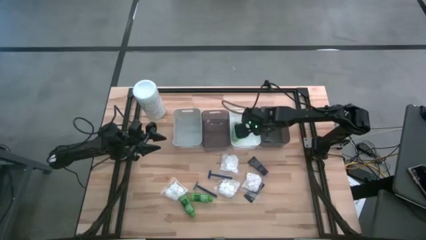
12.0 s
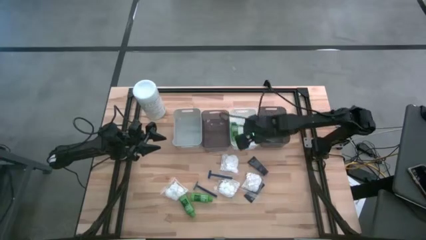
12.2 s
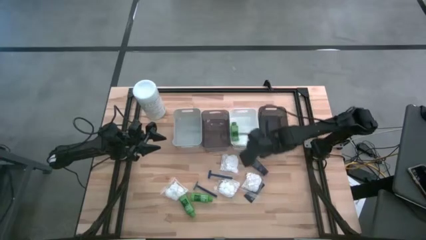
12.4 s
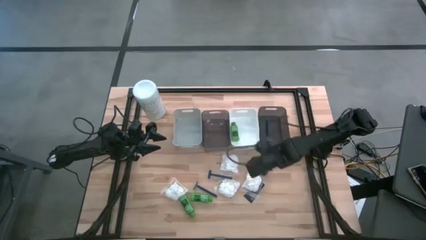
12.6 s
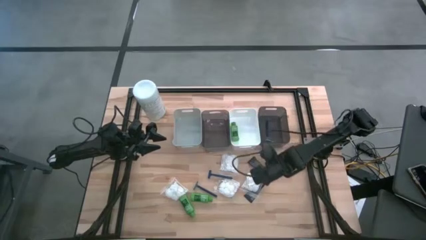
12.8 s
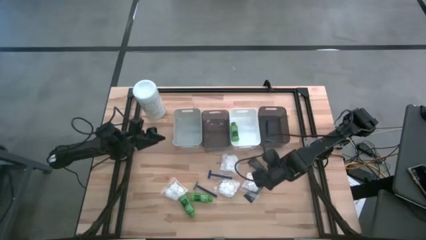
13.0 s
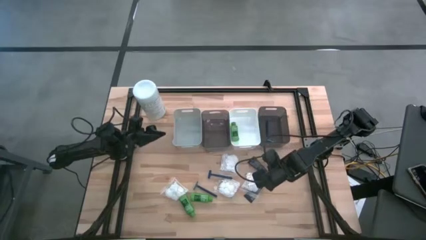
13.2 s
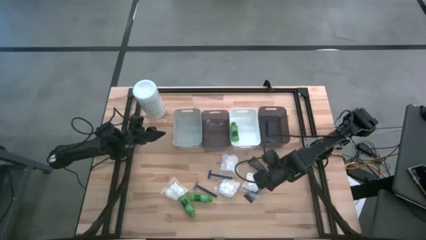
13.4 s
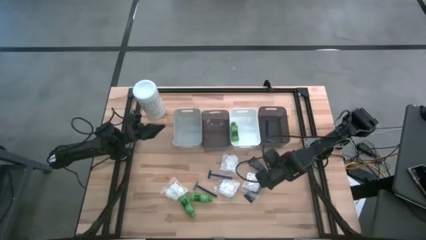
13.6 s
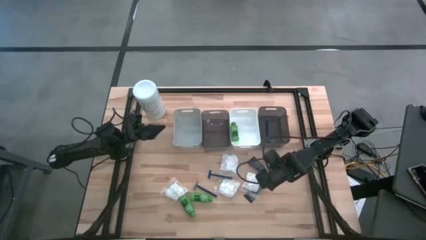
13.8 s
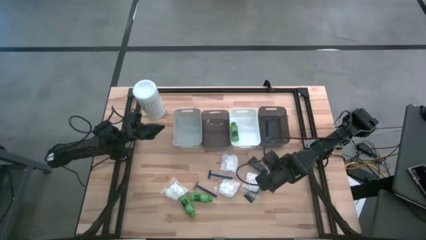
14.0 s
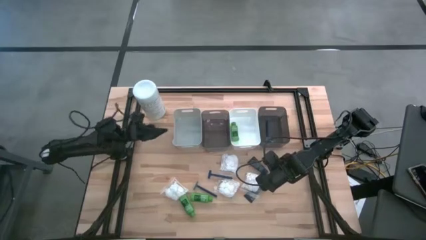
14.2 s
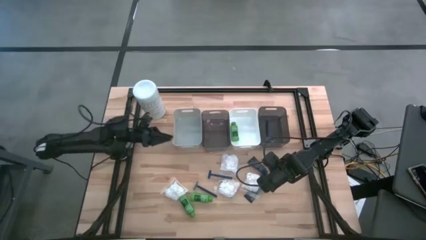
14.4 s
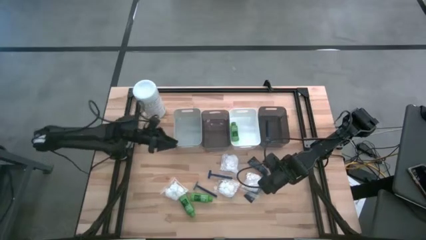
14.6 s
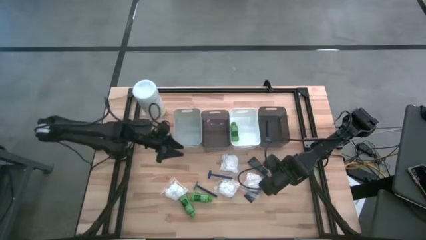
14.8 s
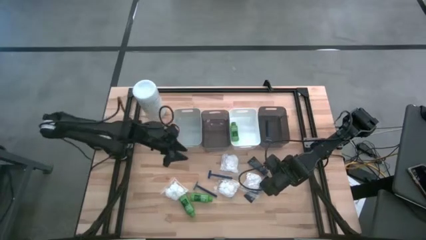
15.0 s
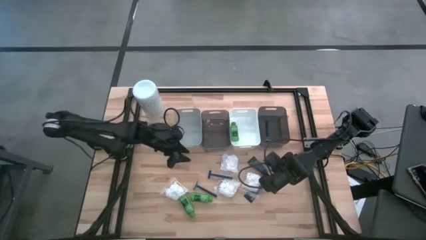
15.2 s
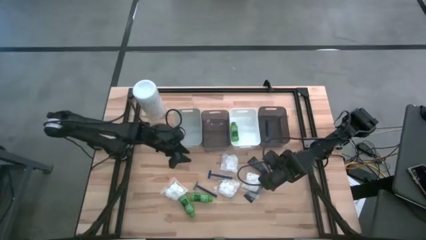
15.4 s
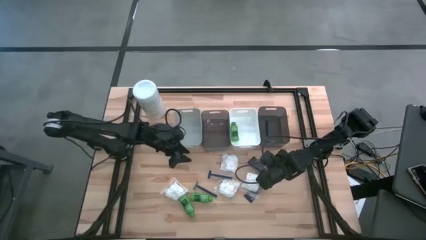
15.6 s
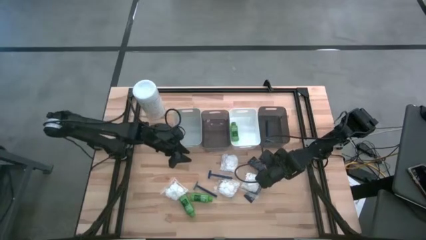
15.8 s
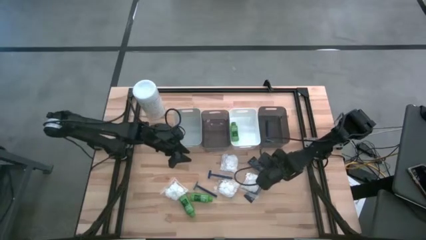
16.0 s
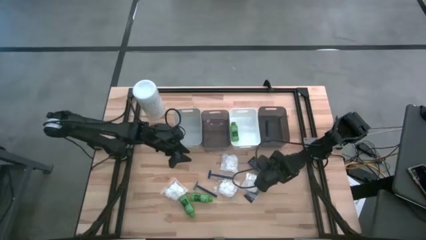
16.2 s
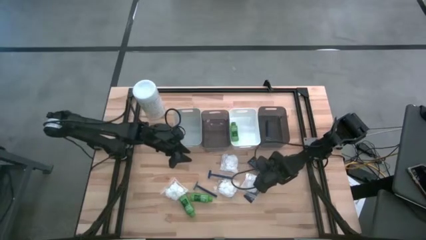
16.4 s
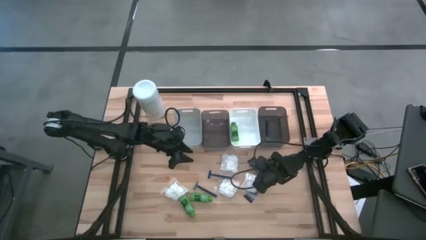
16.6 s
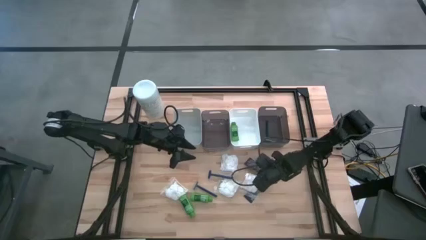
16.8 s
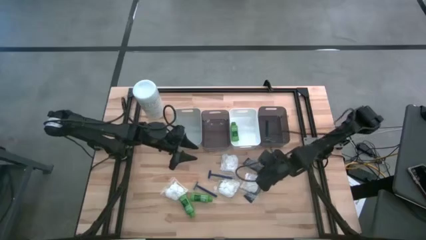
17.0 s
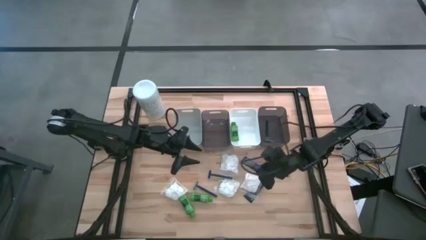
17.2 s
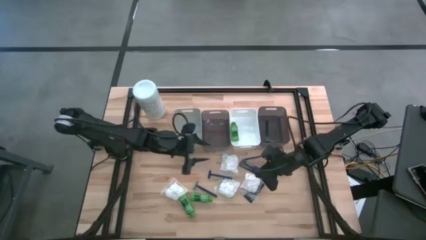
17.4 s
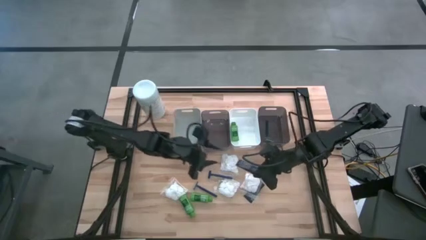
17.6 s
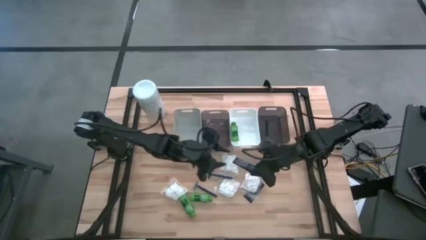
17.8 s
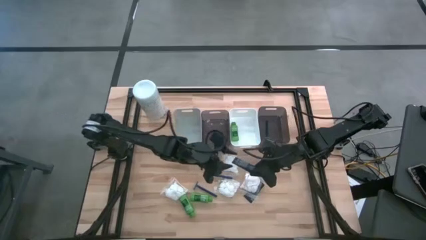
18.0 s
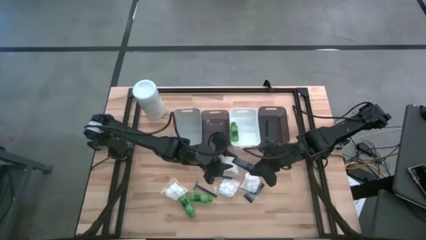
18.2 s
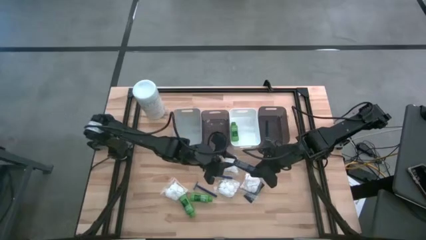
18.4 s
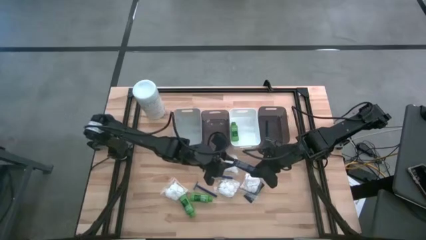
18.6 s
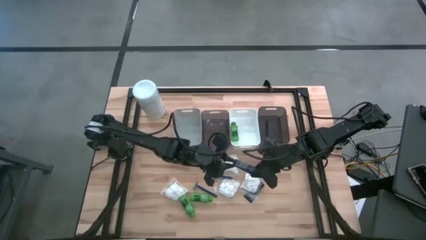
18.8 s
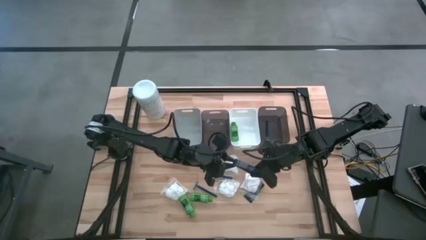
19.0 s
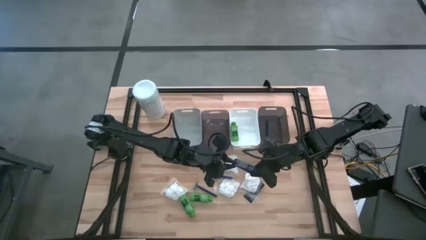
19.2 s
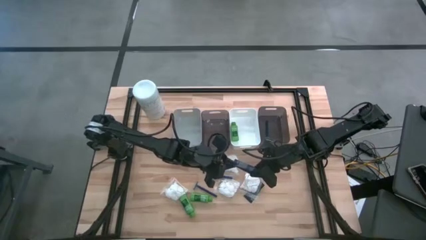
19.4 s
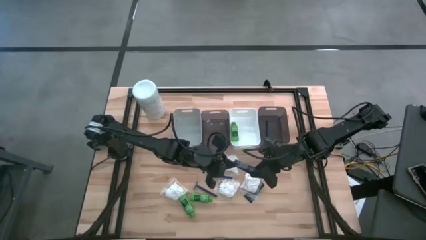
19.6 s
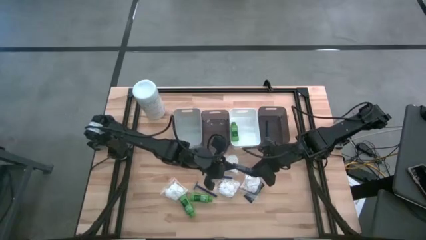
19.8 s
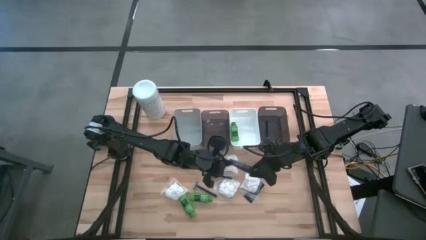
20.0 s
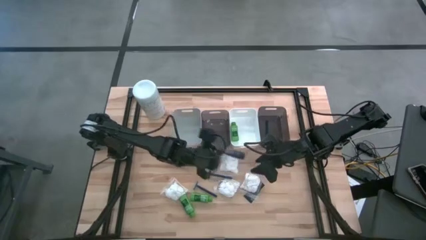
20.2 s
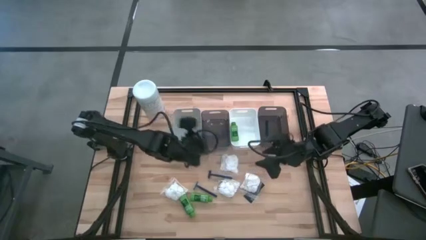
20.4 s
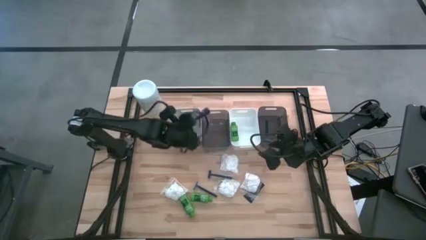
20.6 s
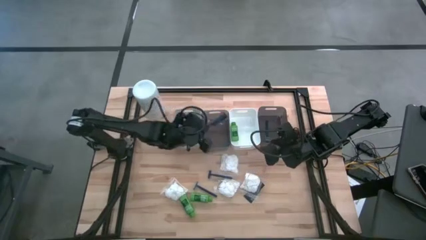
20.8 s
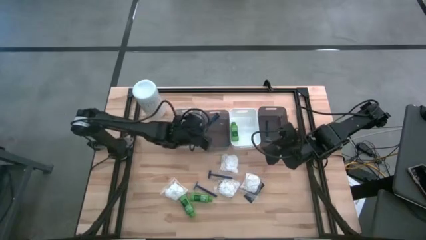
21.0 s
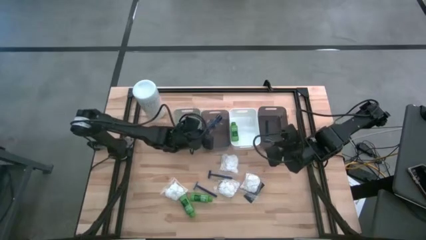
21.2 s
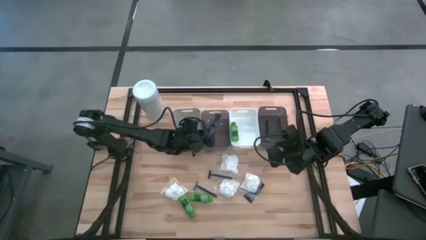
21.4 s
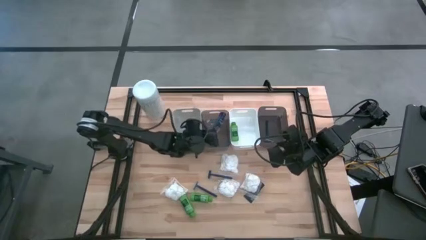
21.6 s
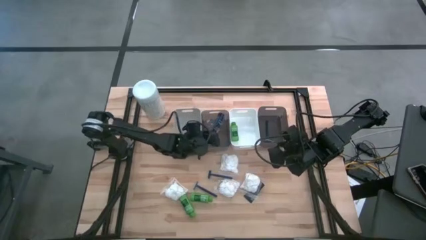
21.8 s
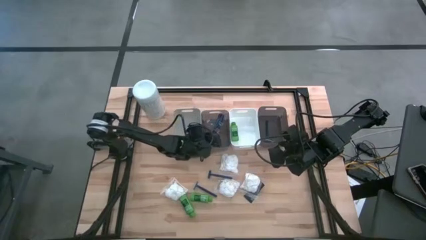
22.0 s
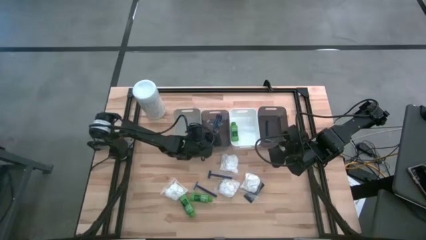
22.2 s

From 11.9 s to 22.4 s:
Task: Pick & Place Travel size toiletries
Put the top blue shave cream into the left black bin

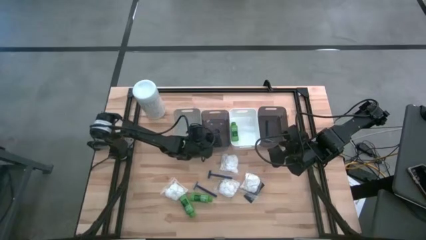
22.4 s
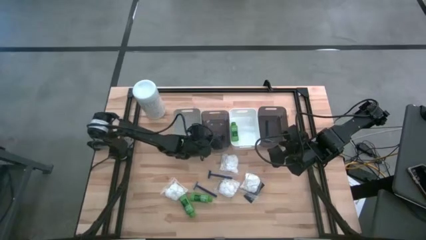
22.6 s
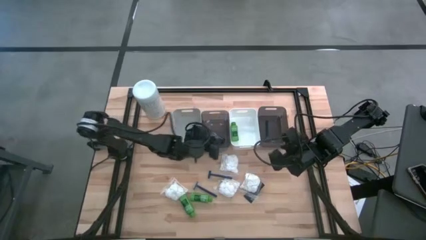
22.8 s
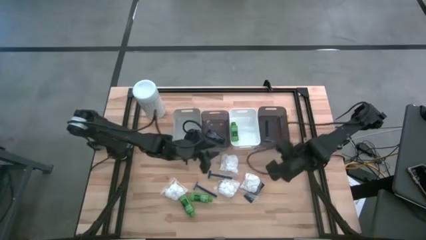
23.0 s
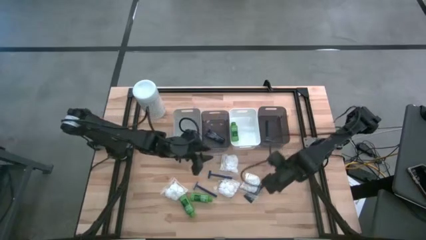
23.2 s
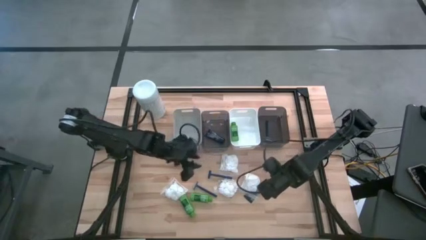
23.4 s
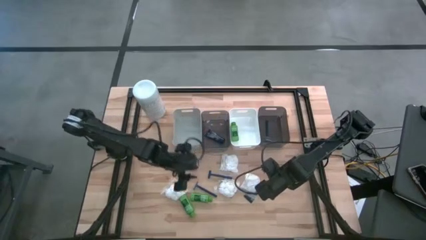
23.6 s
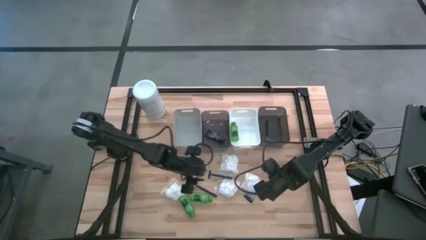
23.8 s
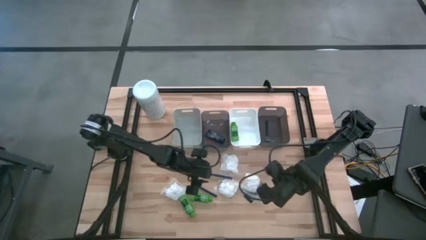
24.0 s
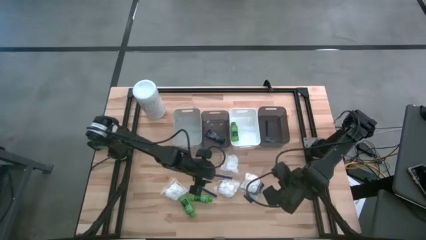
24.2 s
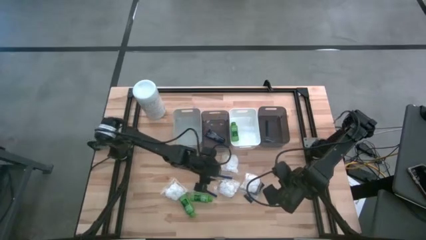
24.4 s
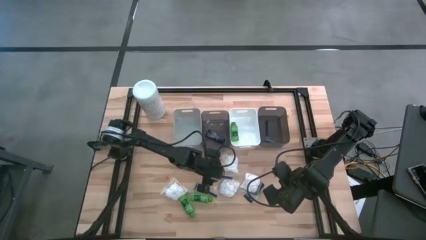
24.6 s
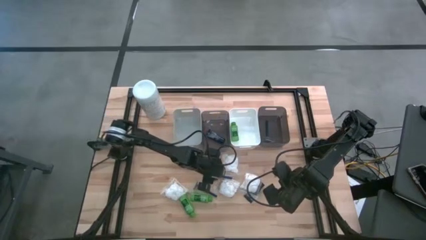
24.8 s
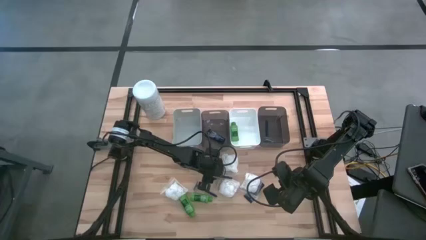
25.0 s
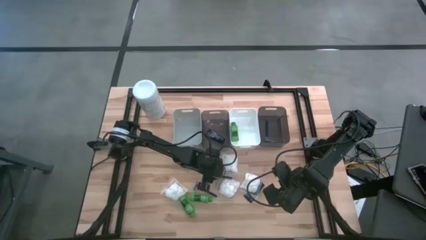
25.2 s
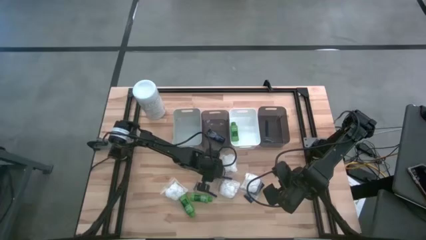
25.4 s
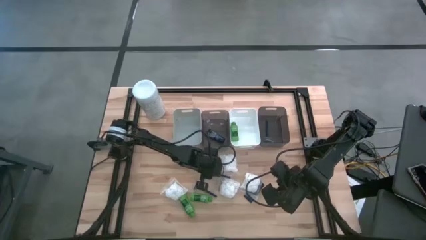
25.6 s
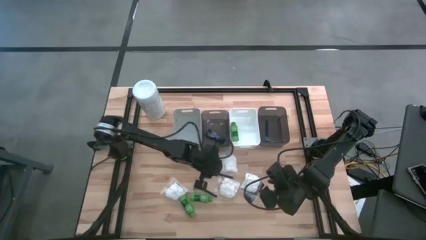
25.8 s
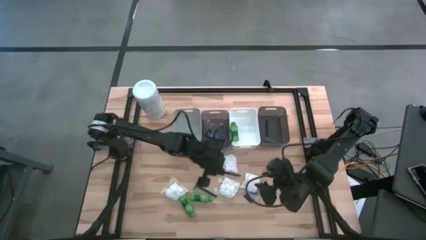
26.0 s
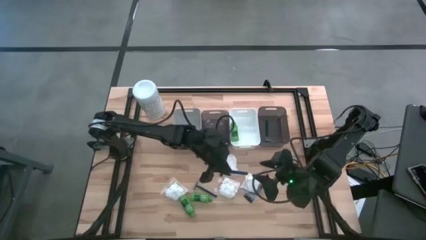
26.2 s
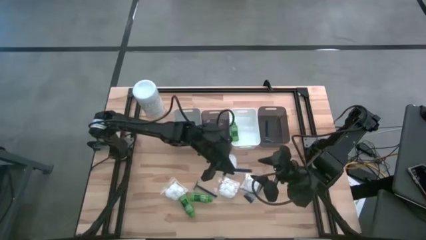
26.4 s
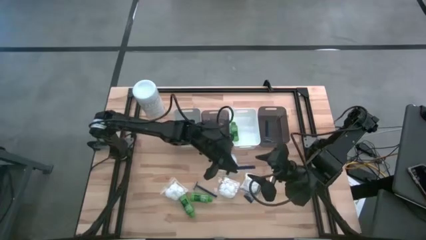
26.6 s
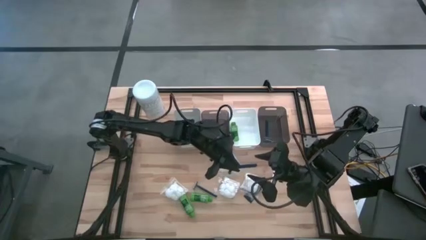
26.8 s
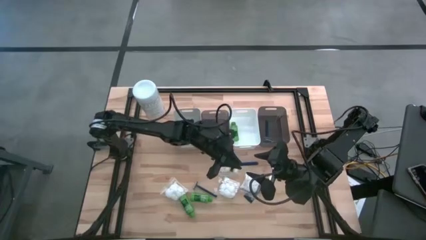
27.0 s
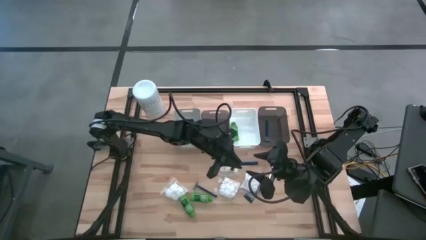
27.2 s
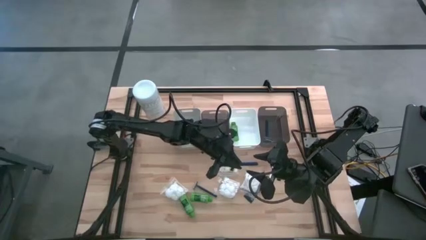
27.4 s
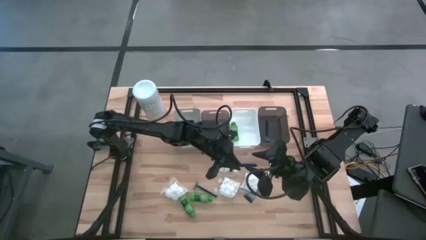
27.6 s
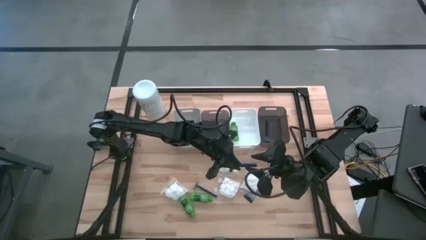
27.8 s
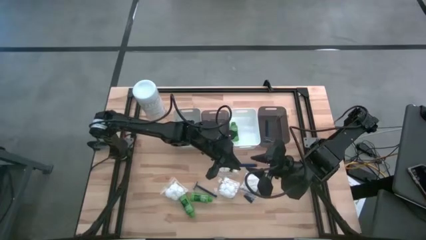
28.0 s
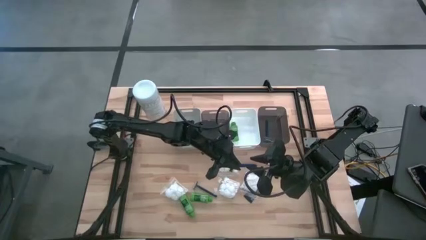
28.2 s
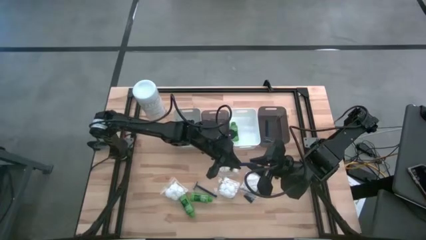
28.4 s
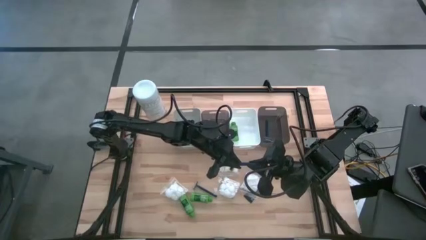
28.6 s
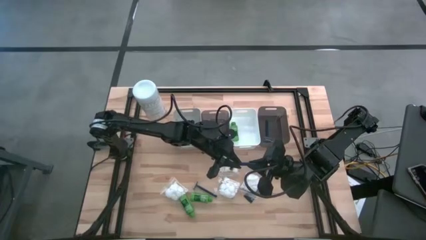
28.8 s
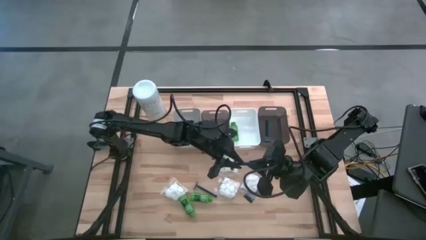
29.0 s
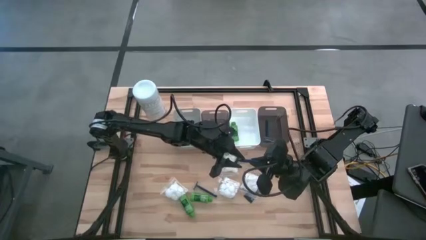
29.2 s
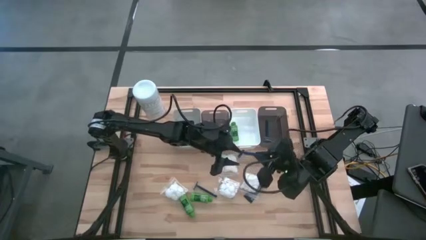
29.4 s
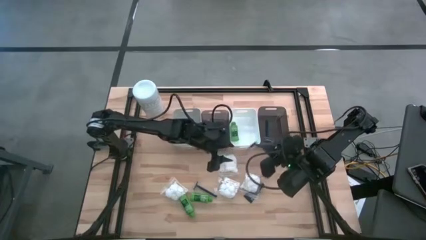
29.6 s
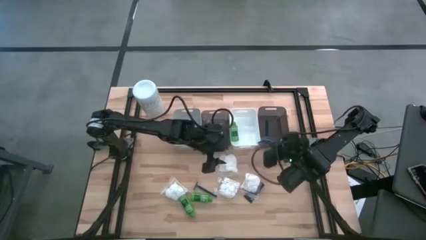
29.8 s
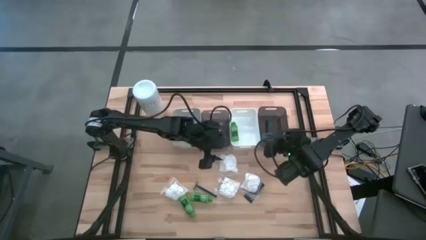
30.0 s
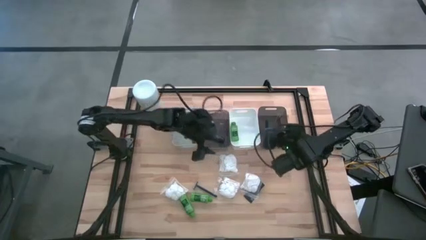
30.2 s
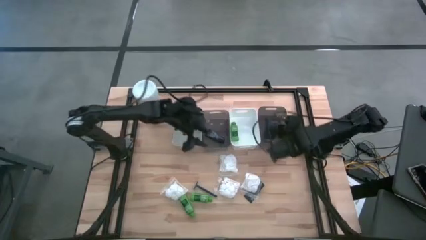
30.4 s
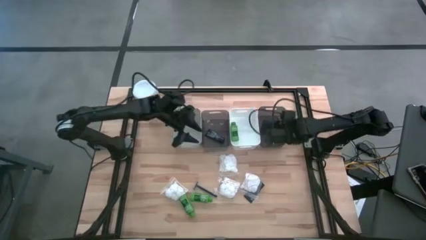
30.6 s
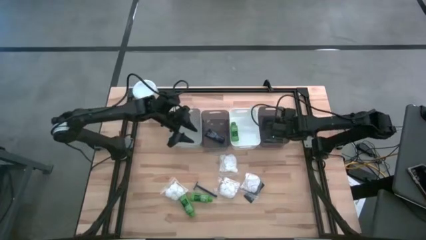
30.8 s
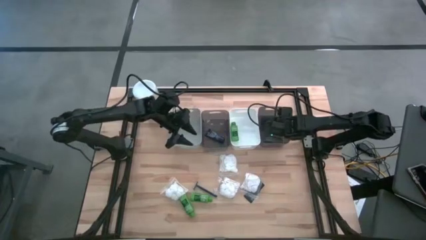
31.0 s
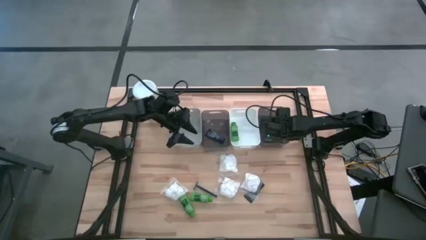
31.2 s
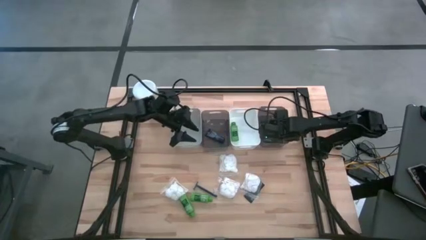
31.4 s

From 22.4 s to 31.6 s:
Put the top blue razor into the right black bin
